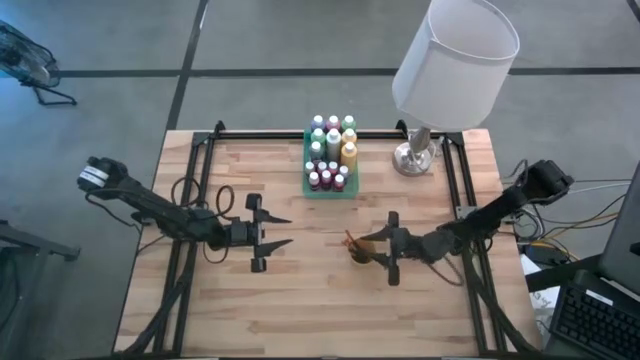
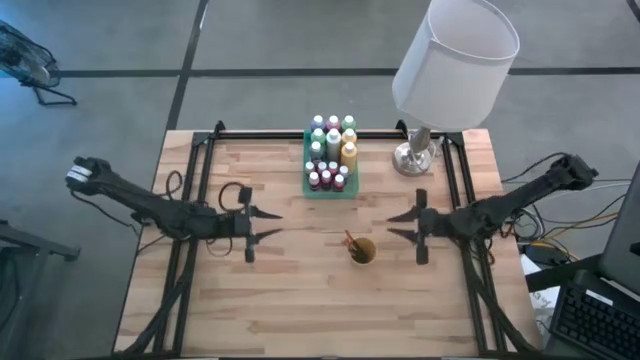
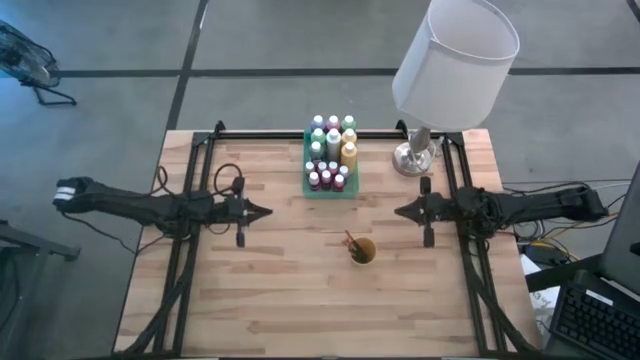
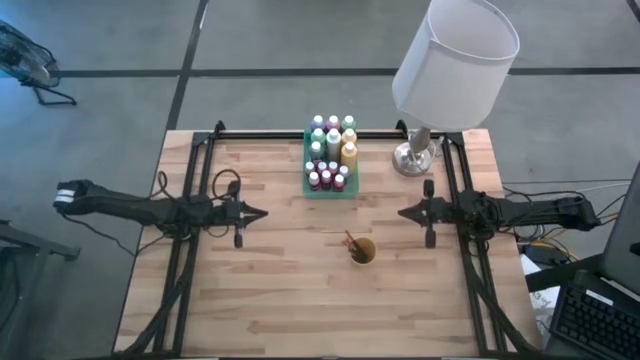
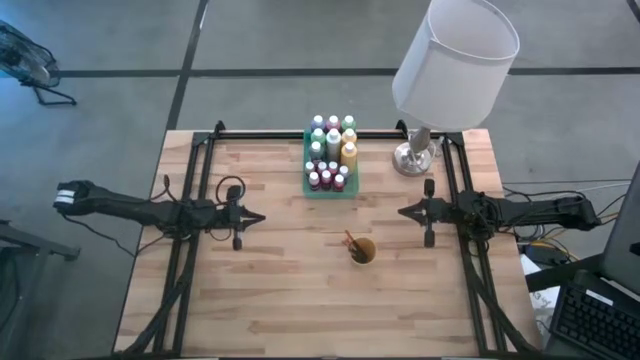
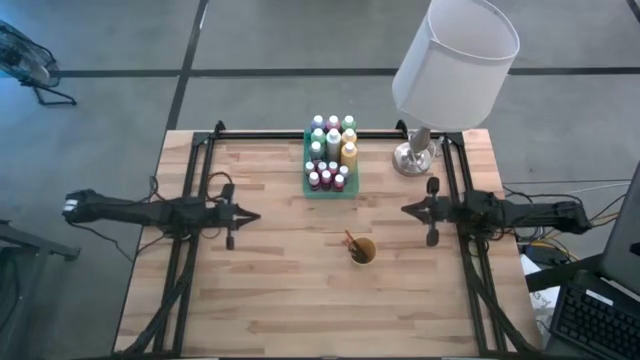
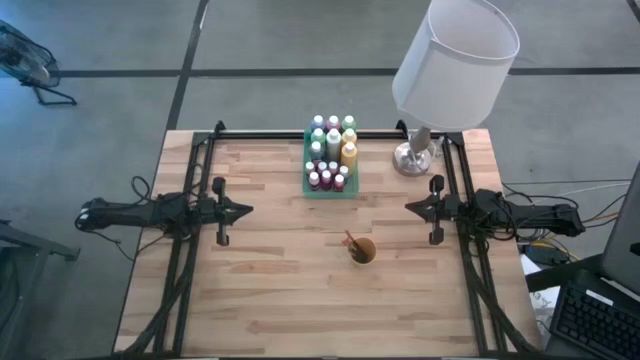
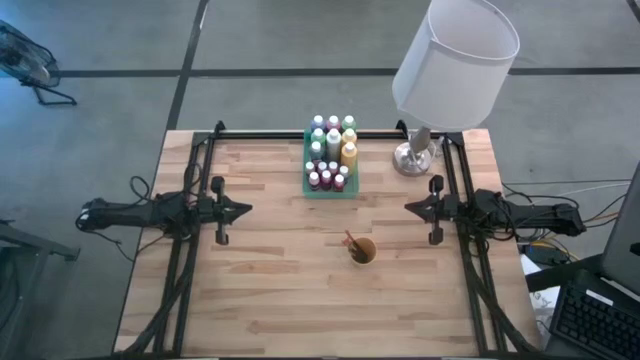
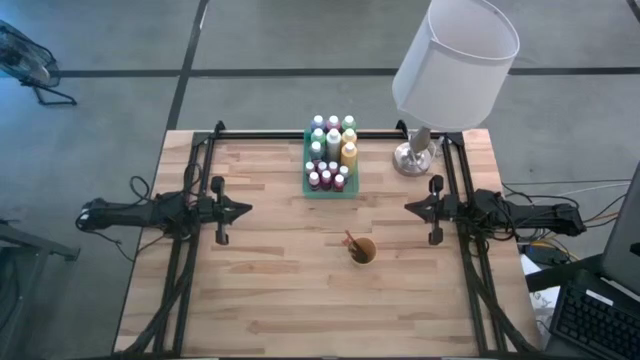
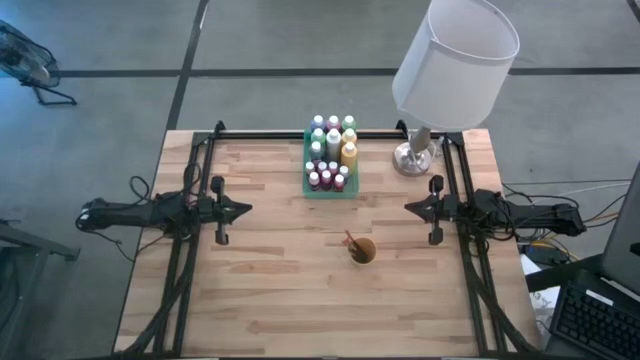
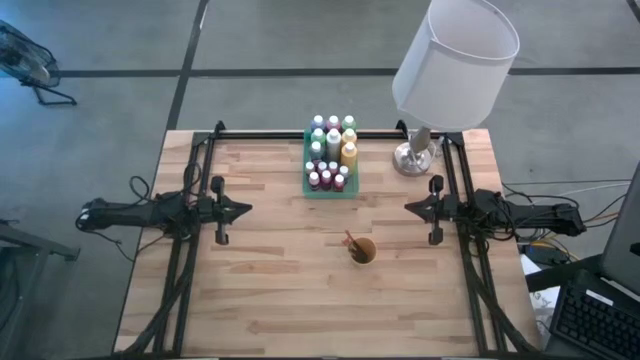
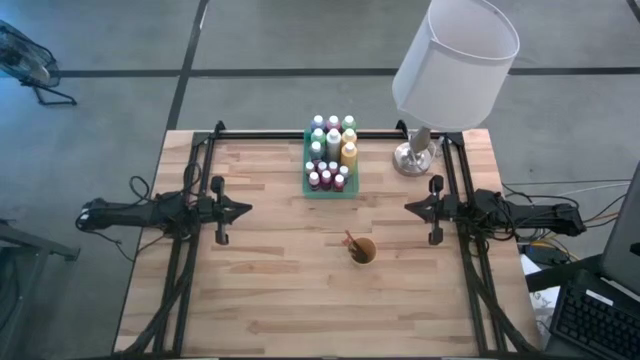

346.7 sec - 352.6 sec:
Task: Pick & Place Paint Supplies
Return to Home Position

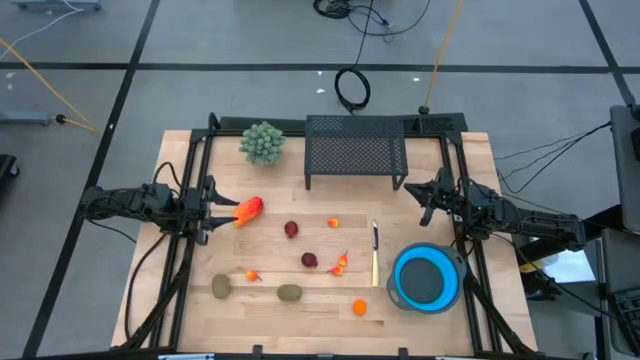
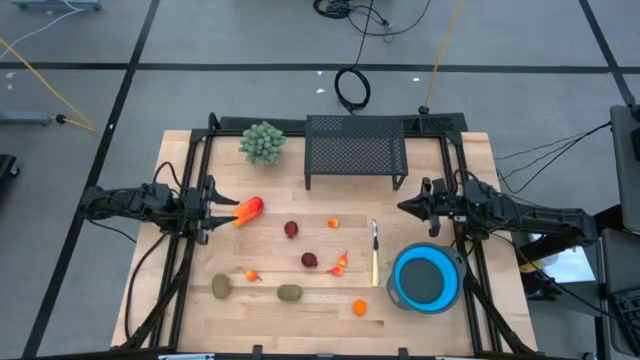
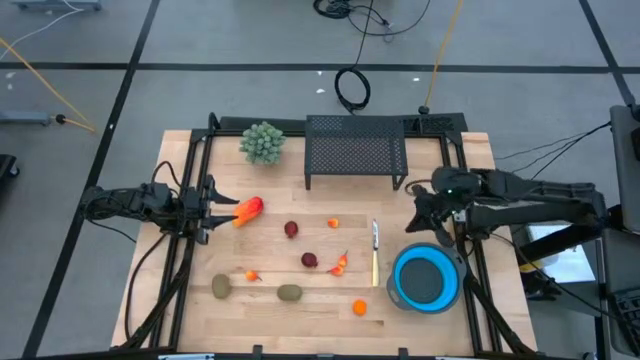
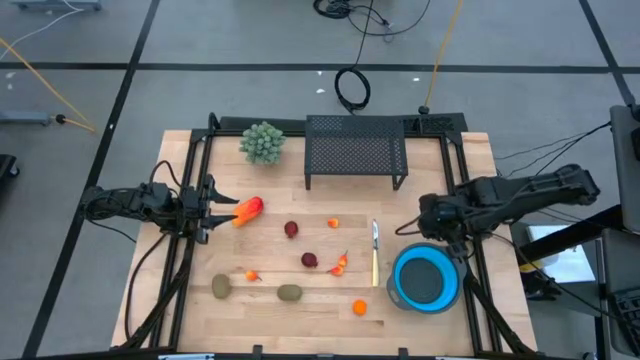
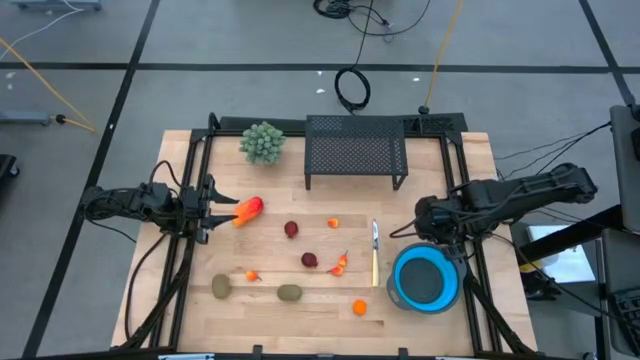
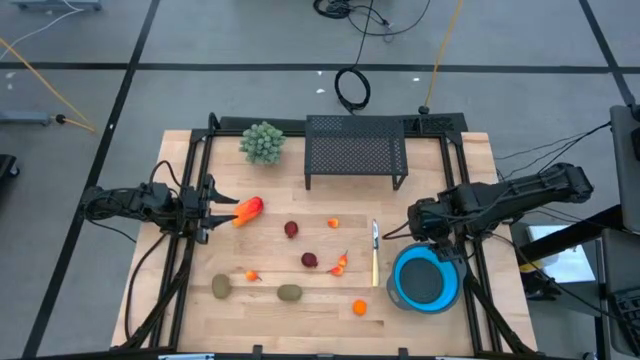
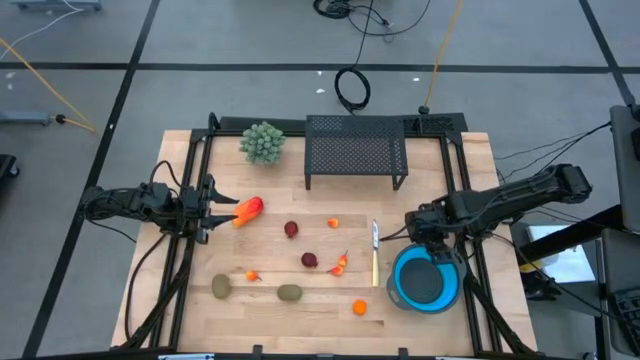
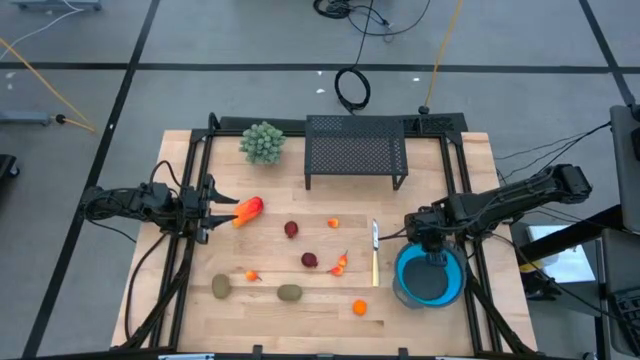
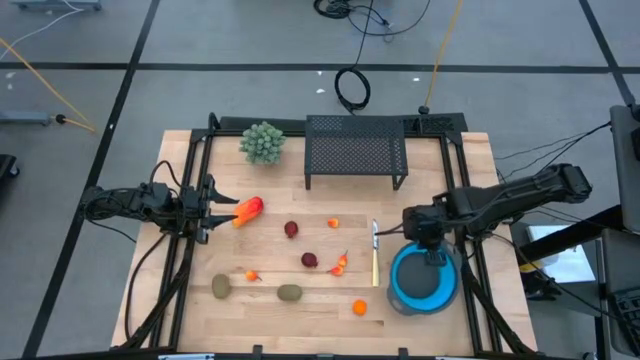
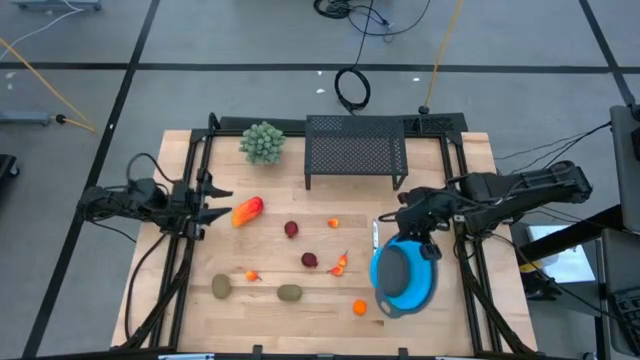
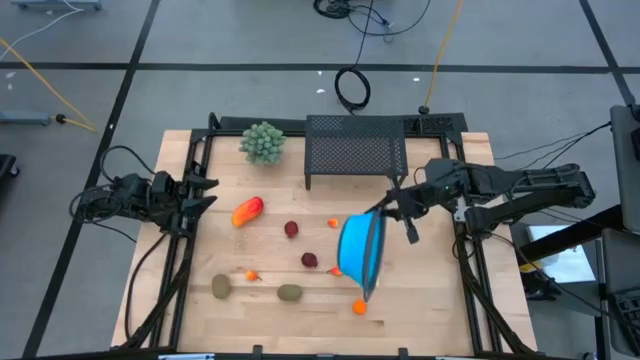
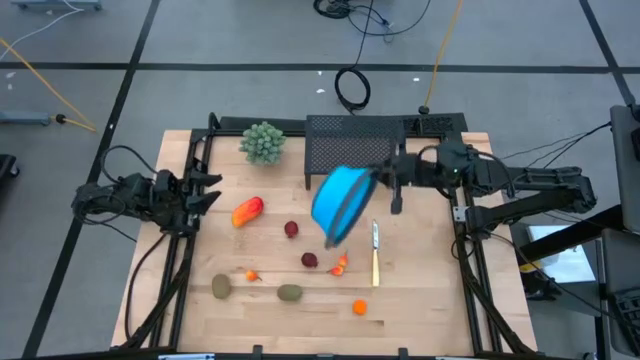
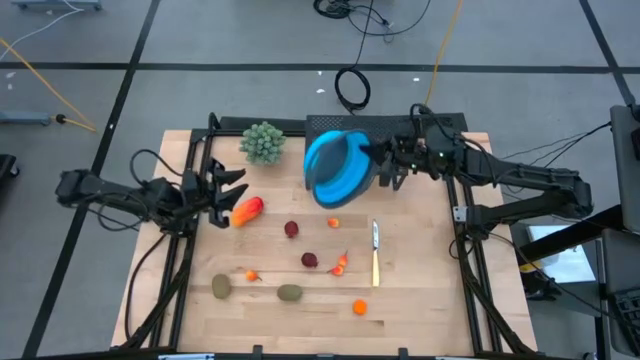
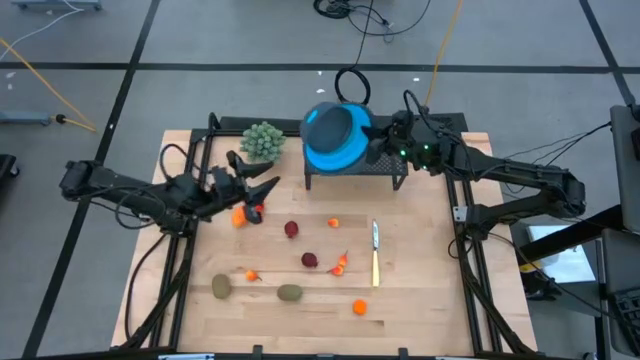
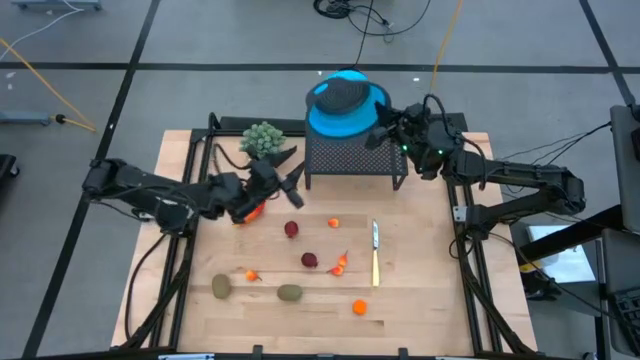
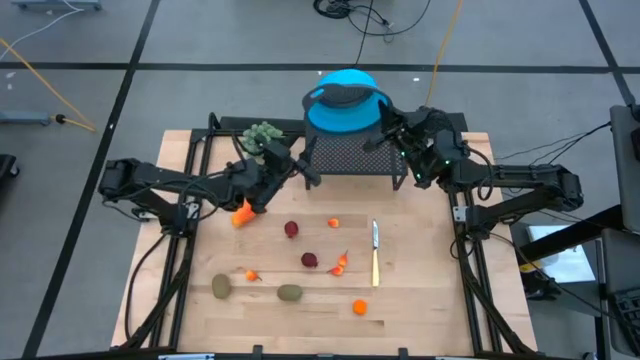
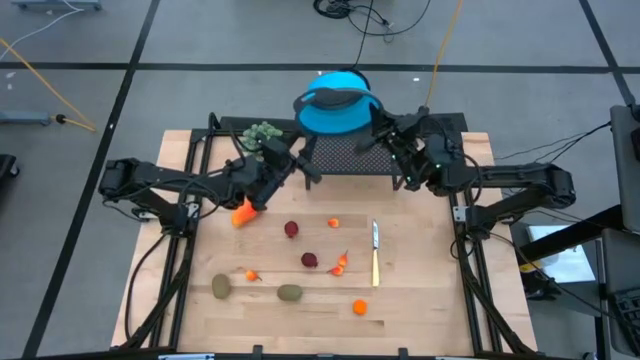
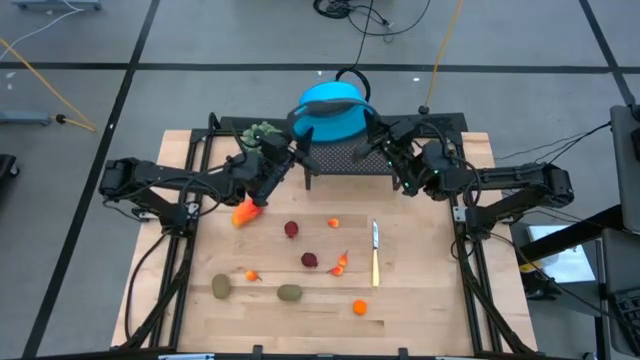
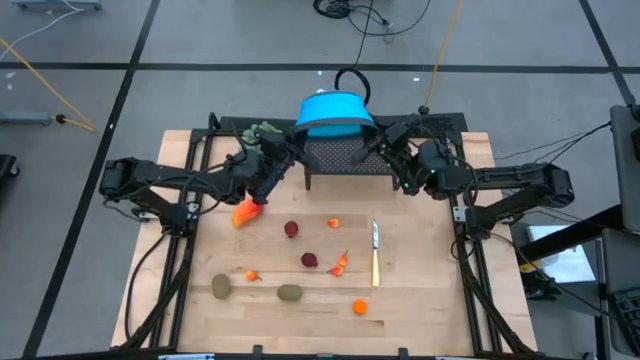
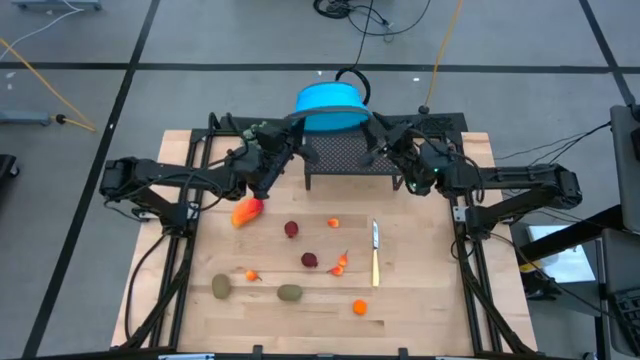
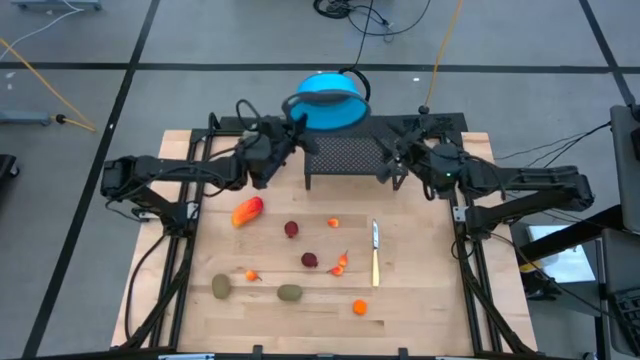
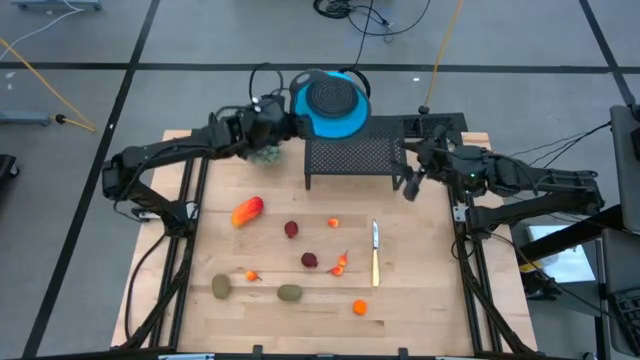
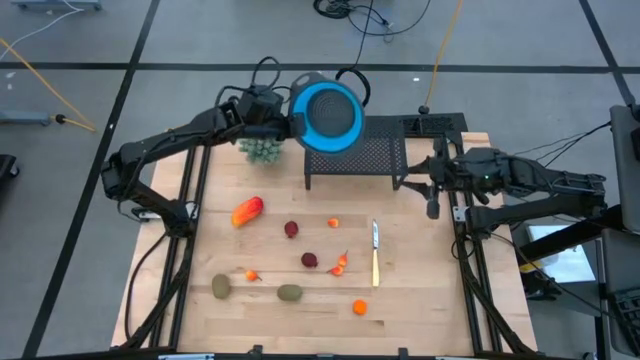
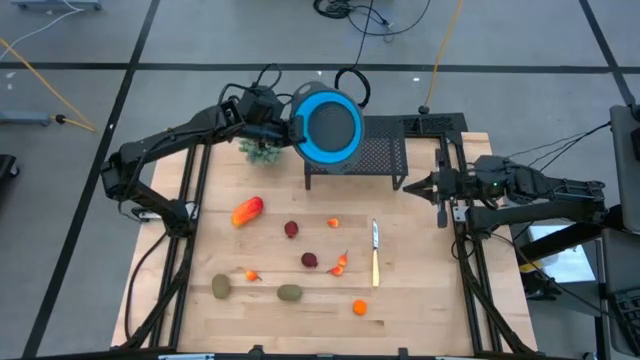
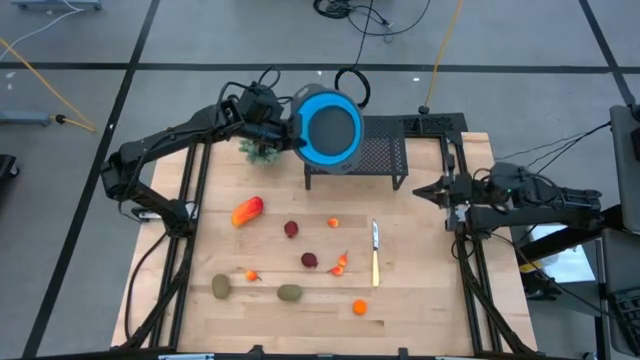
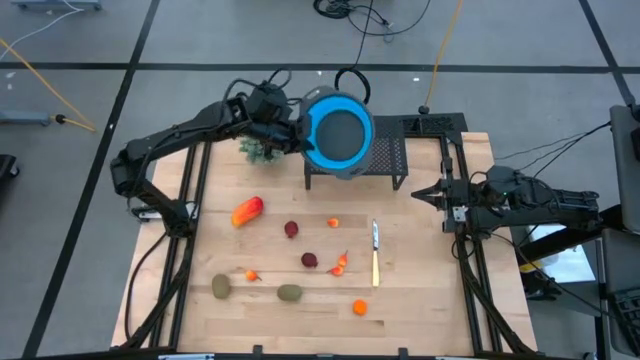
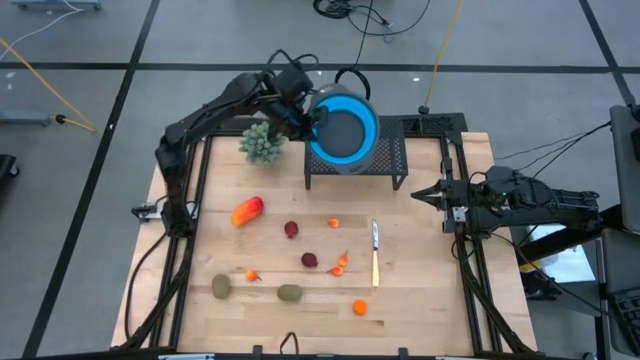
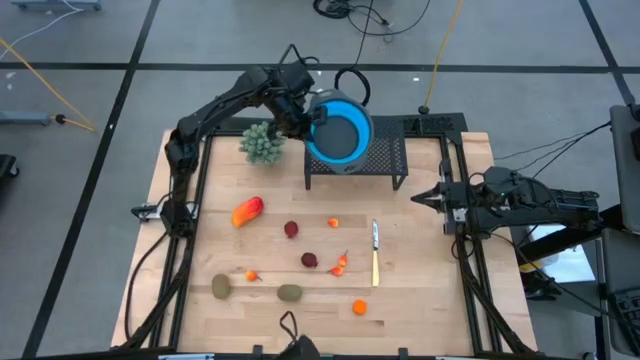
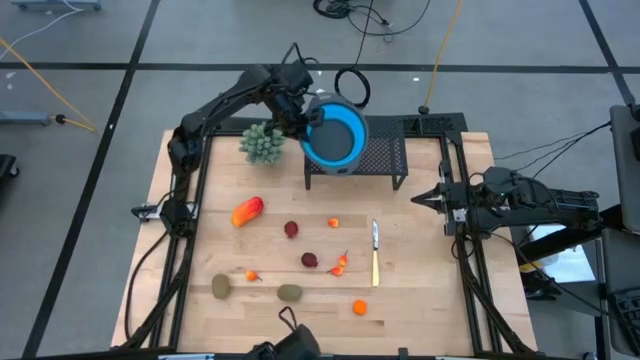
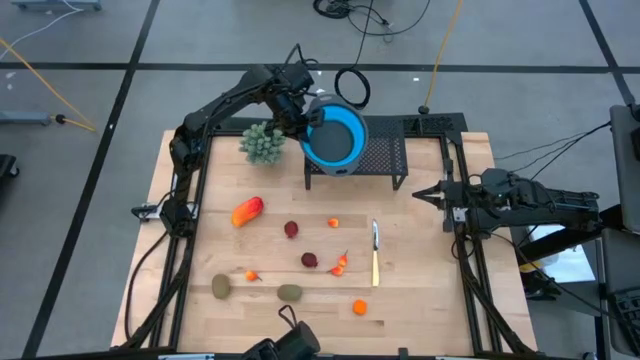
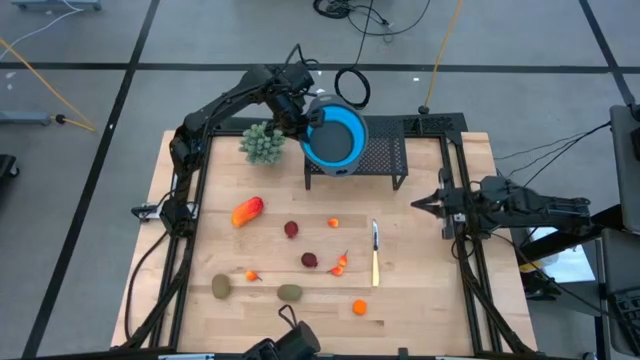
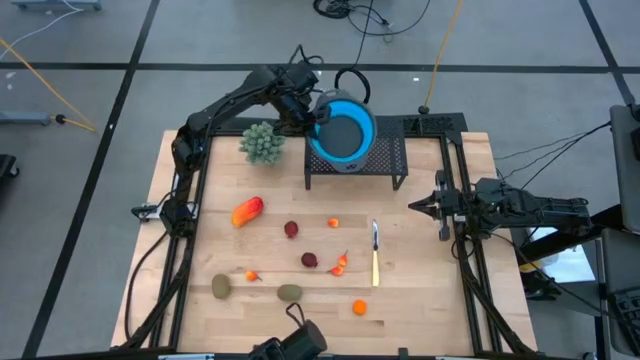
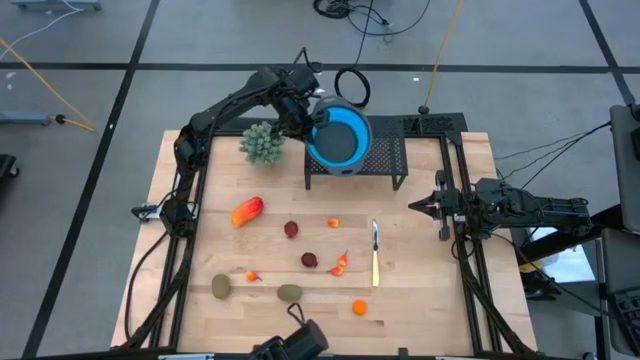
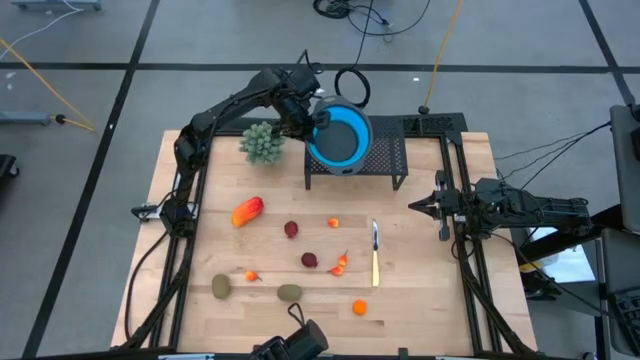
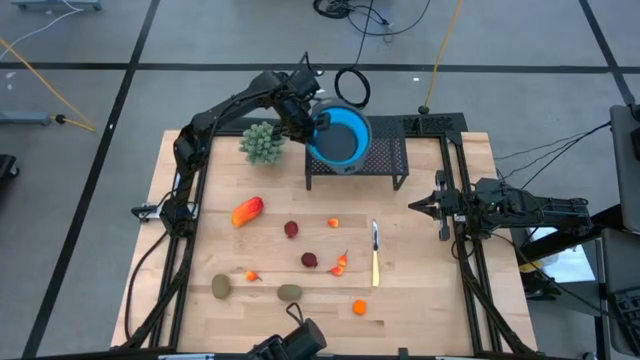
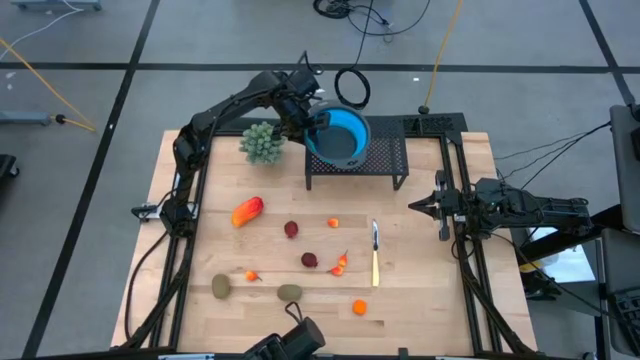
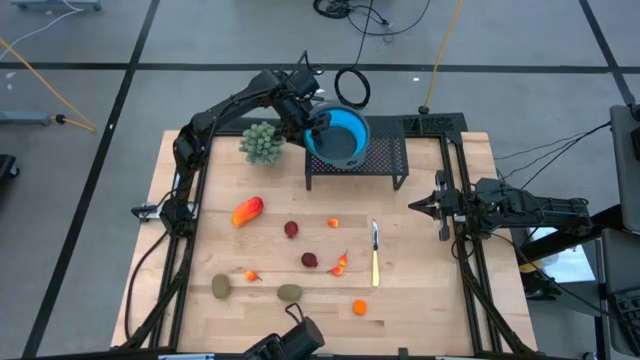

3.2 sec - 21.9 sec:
Task: Pick & Place Fruit
Put the blue strainer bowl on the shelf
